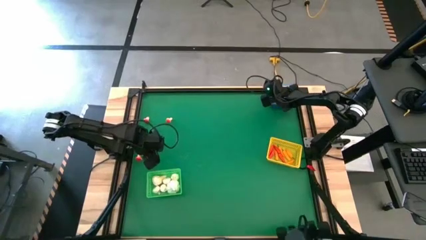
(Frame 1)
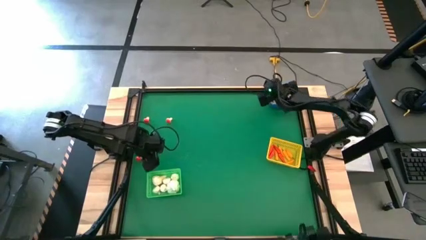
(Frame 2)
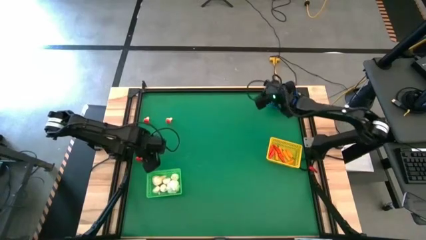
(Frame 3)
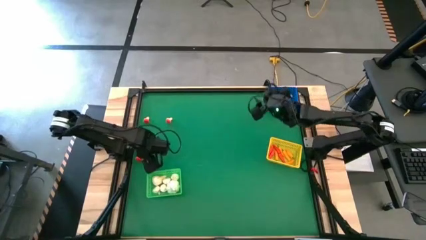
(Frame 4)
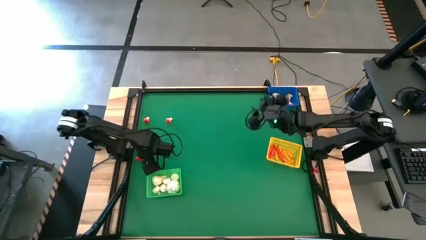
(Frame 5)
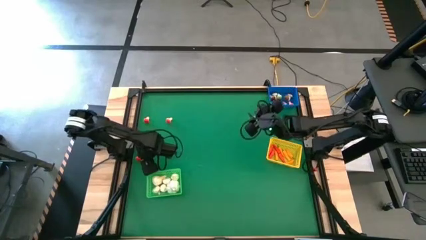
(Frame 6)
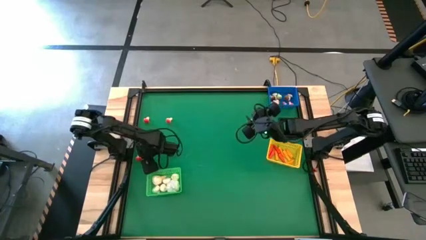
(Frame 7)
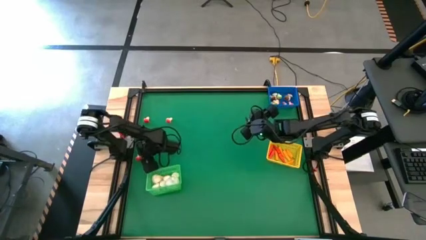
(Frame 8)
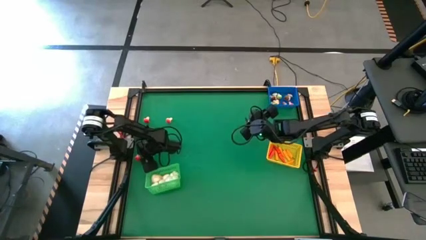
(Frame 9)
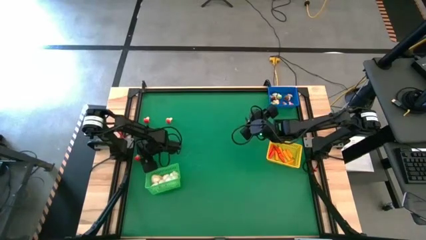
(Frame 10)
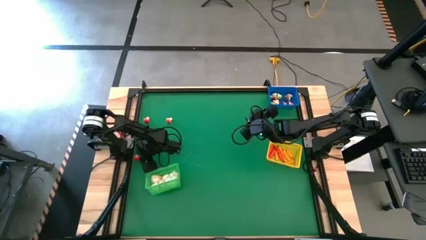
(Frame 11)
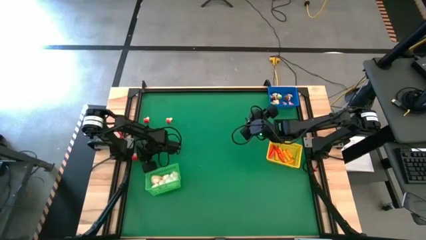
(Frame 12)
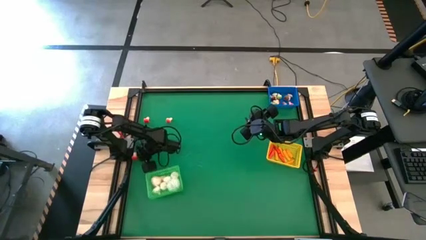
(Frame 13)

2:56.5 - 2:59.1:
Task: Sort produce into baskets
Put the red mushroom into the blue bin

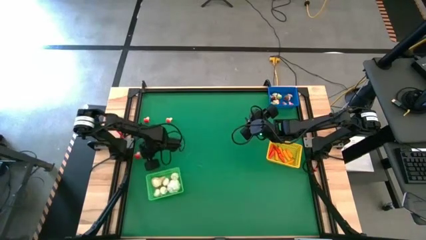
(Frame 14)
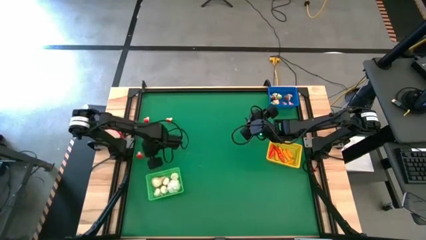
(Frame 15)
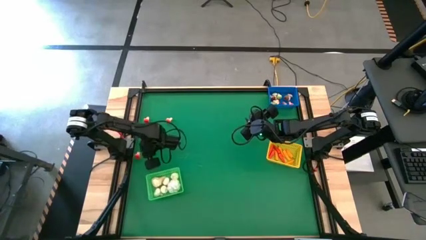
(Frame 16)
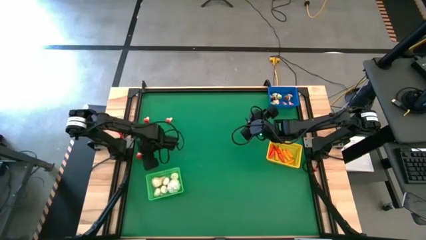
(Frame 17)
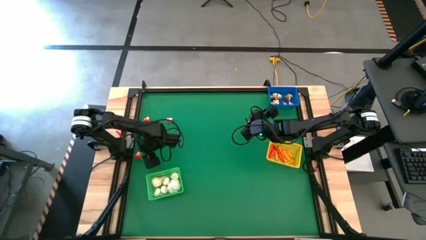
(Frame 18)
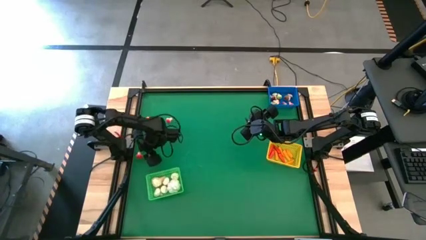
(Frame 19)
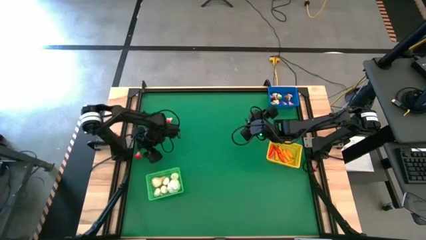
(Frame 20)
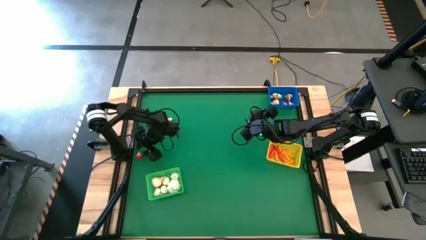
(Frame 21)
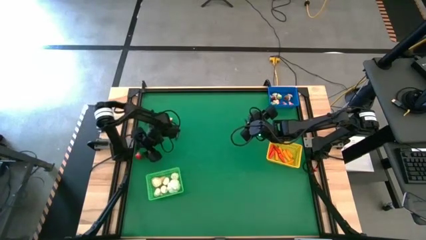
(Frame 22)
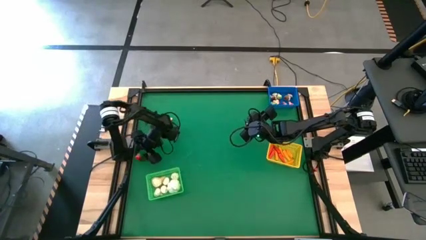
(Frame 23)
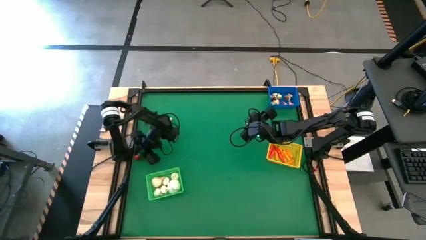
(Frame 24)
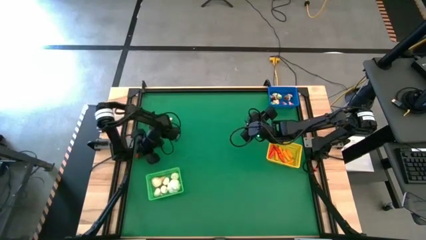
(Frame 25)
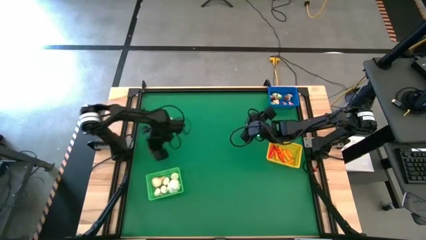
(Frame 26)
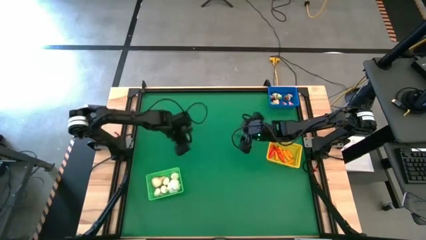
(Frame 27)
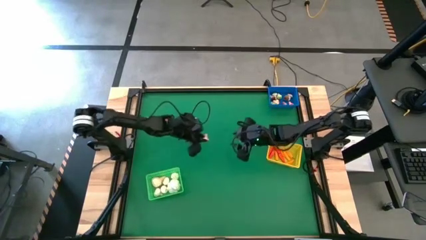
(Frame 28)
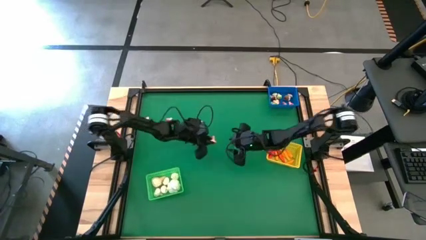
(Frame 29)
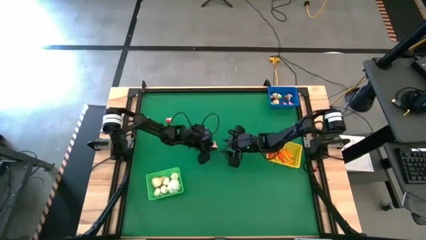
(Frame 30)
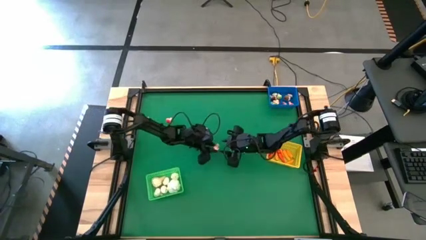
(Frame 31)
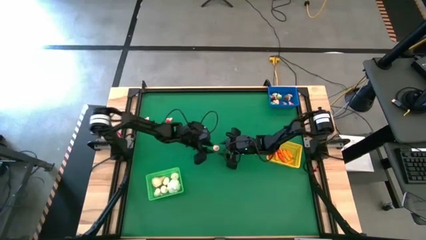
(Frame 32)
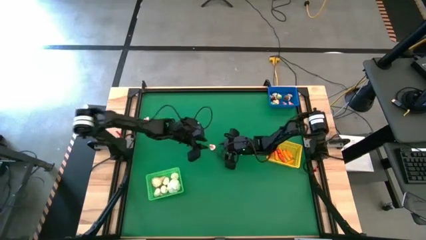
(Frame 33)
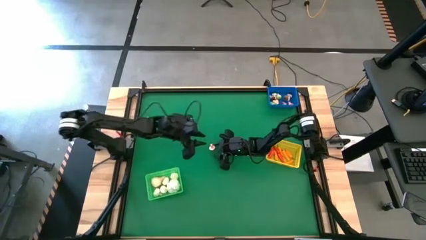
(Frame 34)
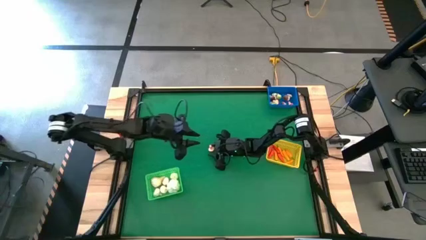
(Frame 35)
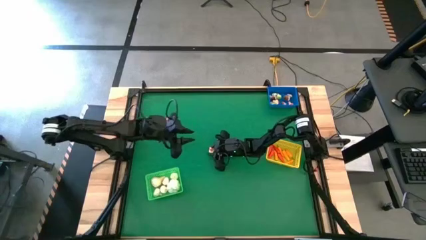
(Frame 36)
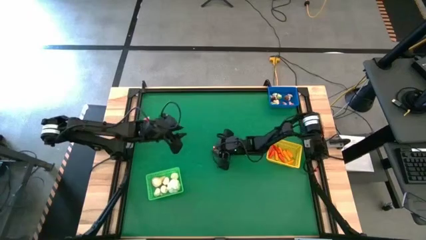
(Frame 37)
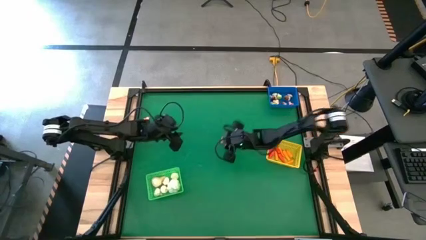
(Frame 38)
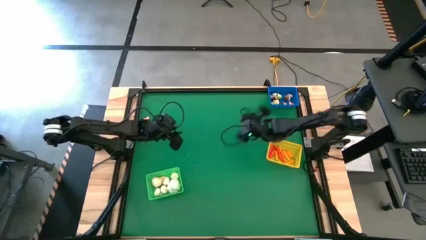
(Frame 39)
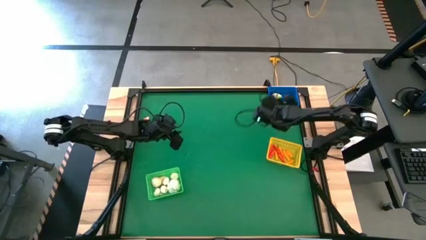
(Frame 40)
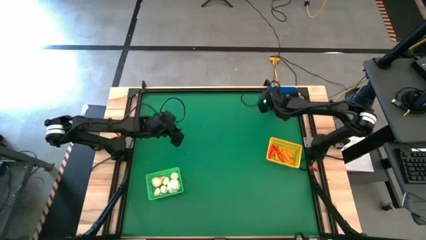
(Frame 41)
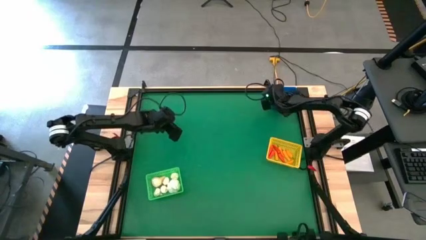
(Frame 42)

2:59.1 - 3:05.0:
Put the red mushroom into the blue bin

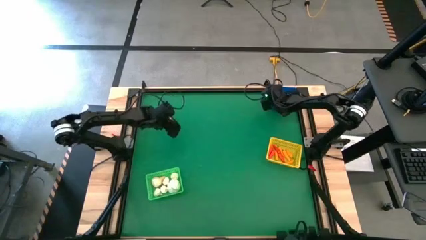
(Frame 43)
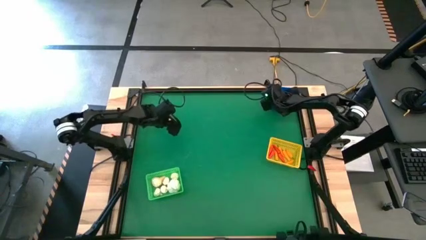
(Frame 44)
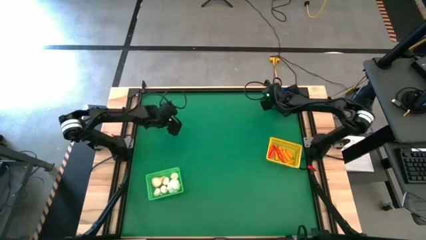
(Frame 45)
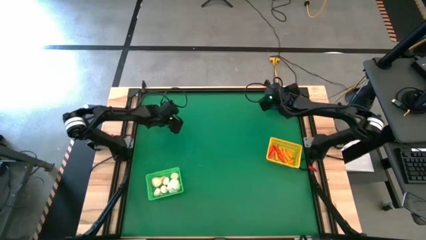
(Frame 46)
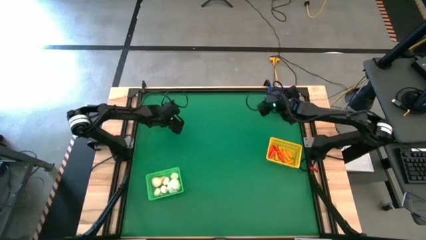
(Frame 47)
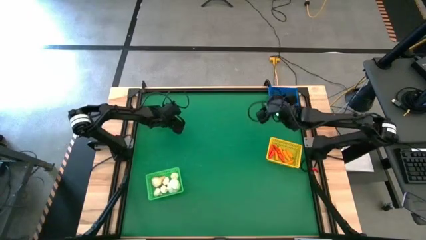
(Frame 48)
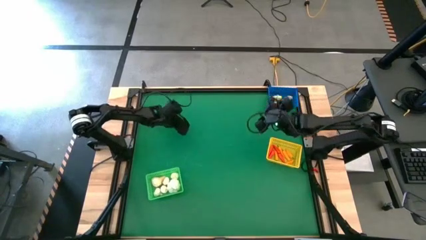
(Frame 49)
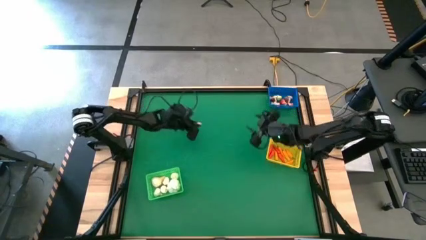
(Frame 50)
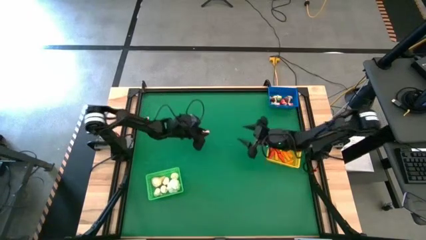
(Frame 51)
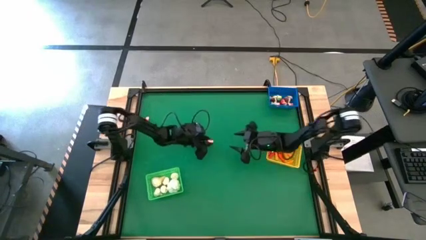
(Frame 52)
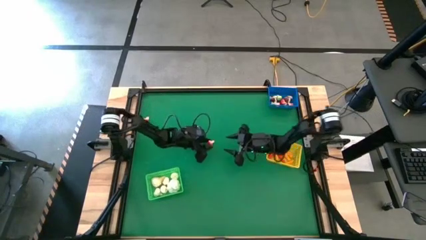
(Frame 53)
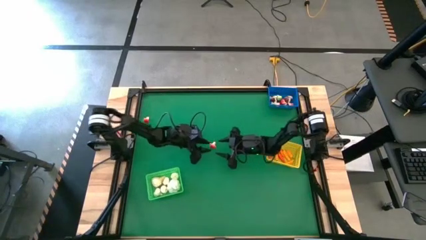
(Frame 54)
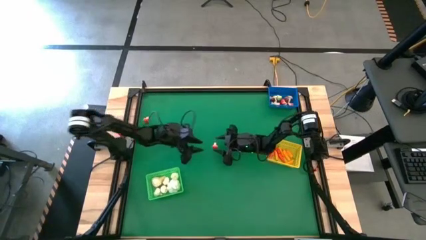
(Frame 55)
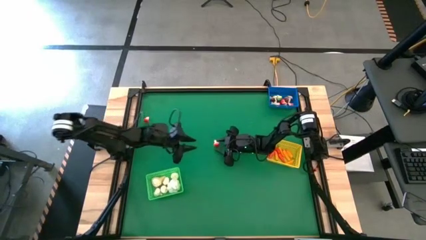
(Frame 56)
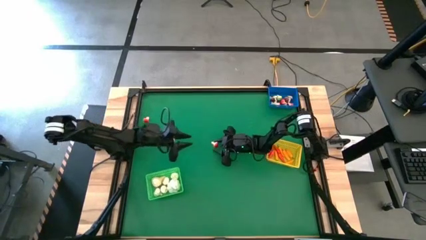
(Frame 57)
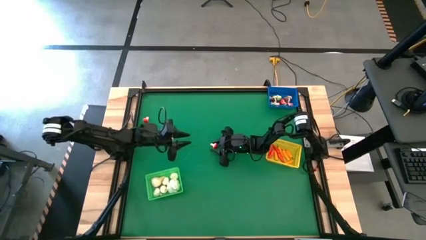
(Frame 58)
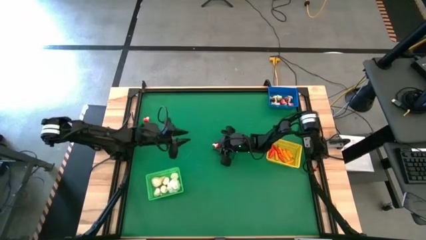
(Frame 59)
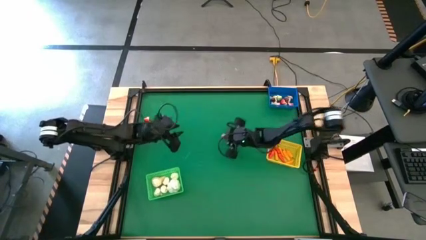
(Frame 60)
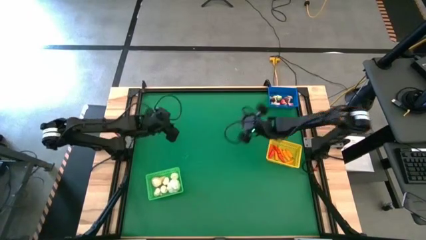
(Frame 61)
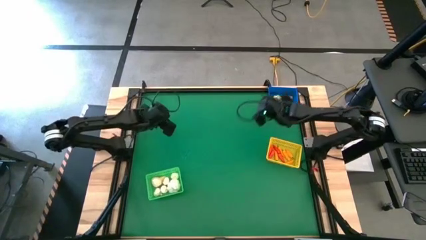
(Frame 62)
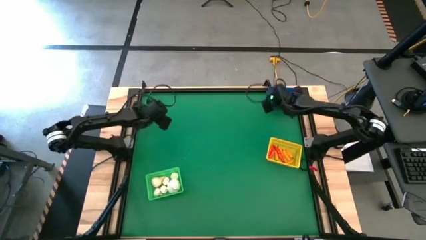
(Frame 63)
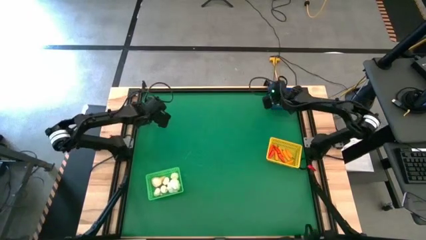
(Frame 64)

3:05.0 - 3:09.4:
Put the red mushroom into the blue bin

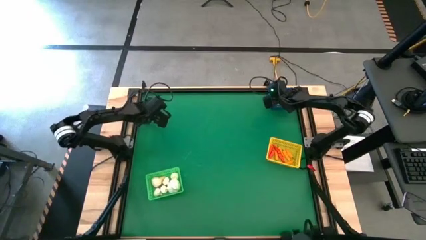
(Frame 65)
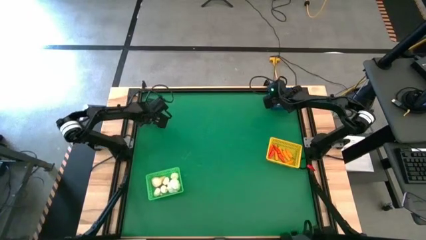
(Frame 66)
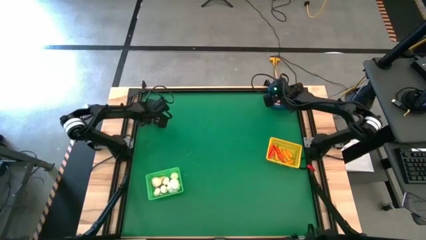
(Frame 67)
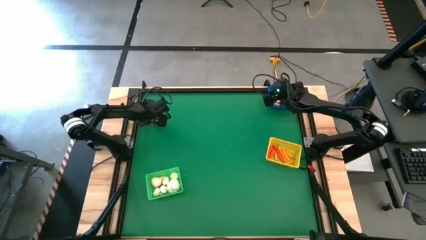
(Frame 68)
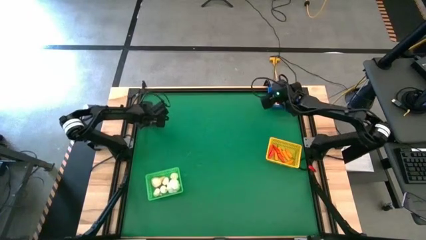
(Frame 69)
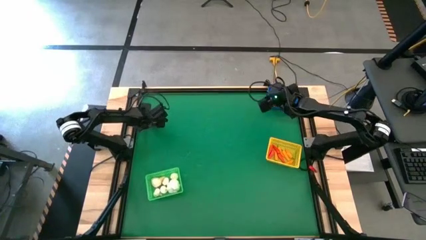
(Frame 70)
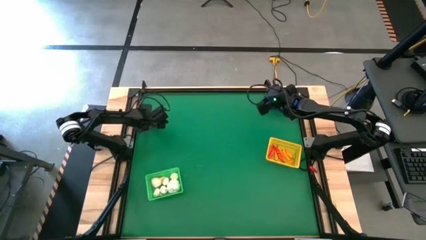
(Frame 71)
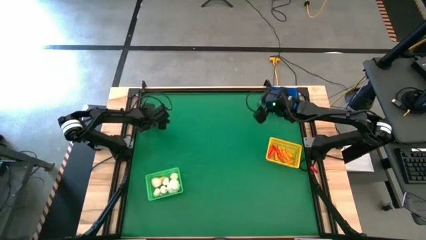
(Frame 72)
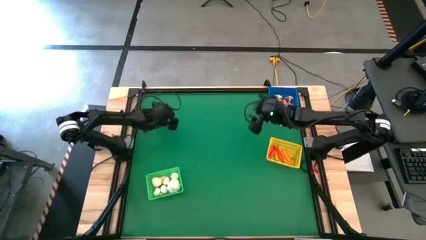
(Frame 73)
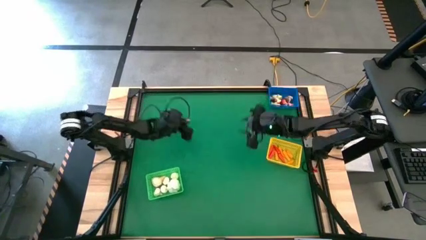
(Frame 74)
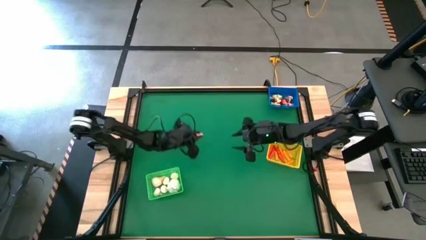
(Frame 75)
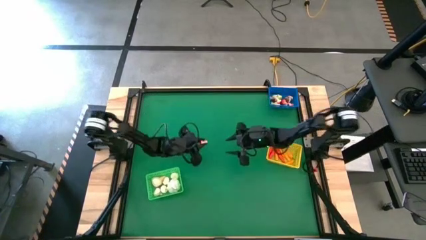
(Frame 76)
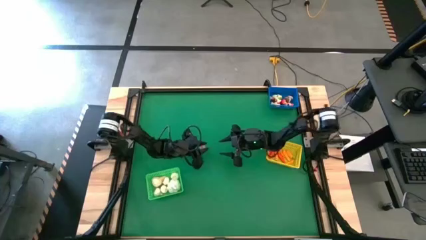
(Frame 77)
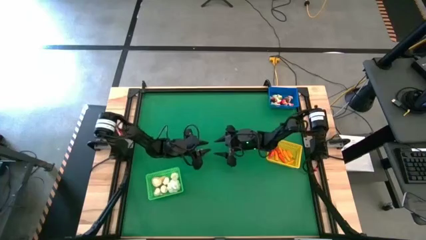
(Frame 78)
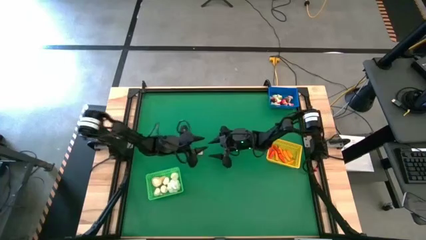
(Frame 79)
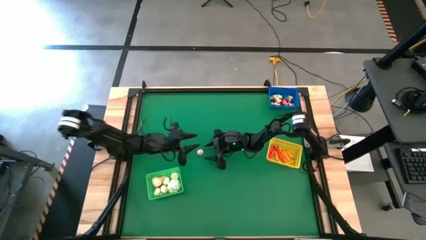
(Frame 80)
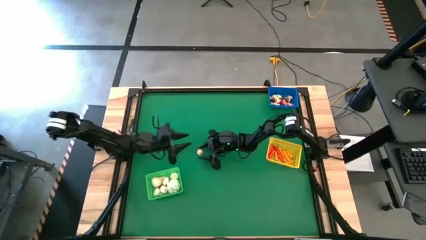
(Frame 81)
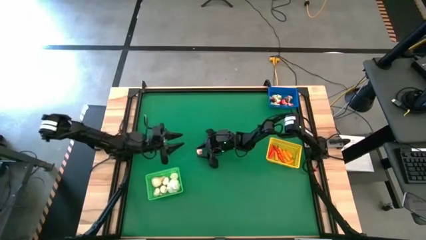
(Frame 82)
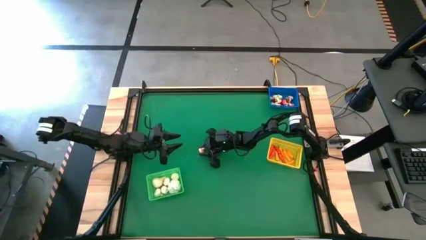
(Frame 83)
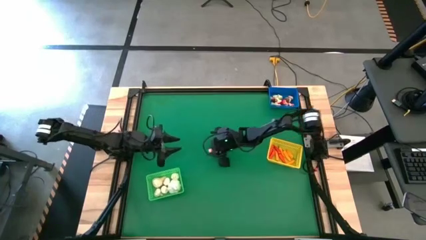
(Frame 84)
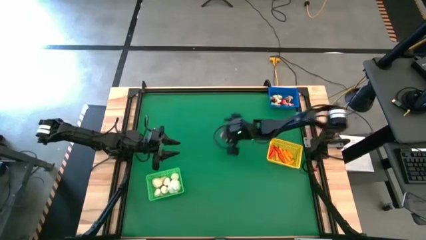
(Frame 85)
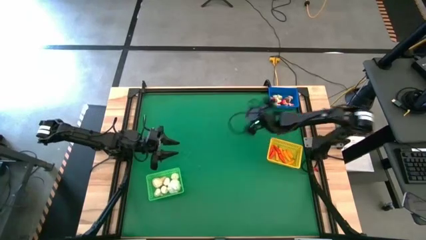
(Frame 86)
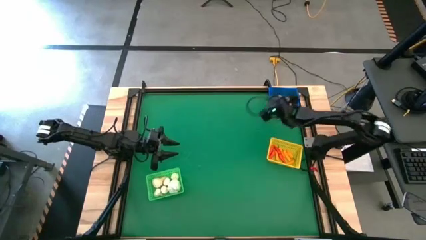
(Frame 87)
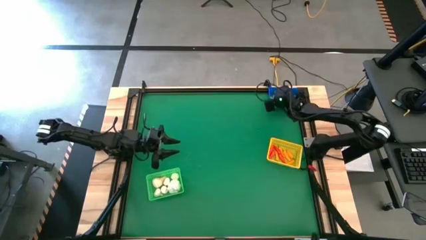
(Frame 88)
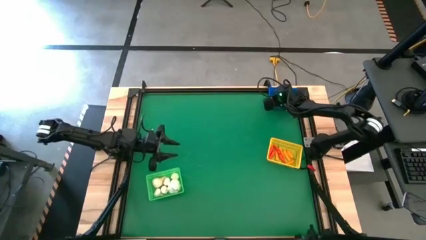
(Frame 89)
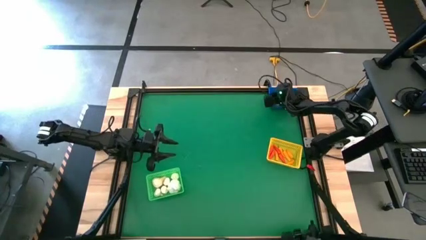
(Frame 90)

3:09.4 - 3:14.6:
Put the red mushroom into the blue bin
